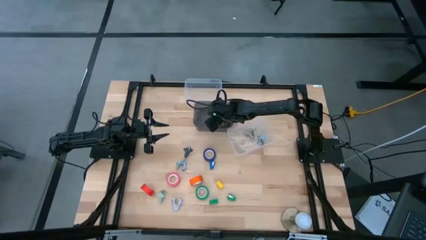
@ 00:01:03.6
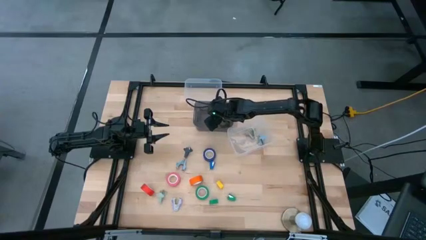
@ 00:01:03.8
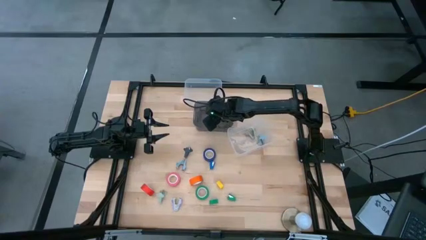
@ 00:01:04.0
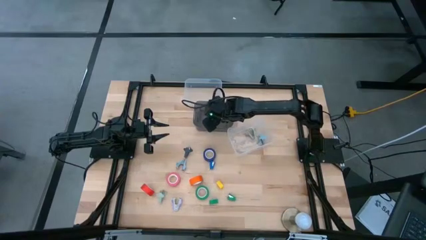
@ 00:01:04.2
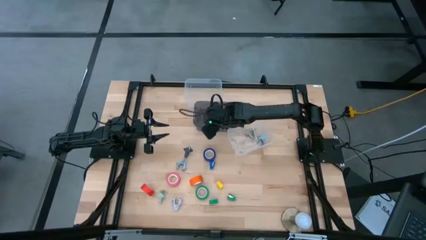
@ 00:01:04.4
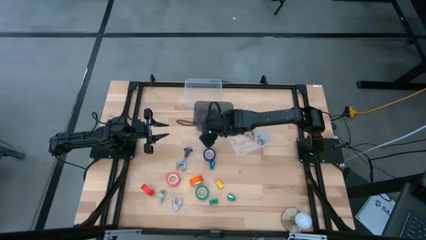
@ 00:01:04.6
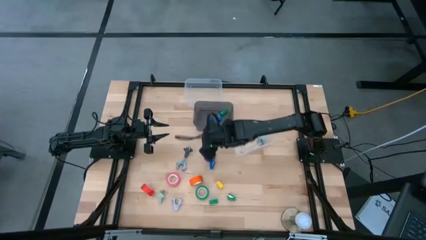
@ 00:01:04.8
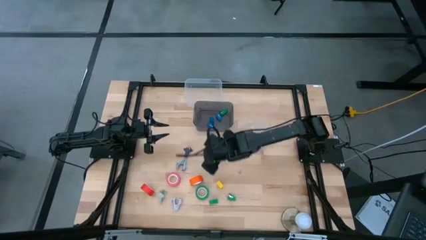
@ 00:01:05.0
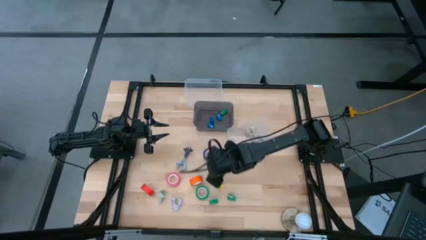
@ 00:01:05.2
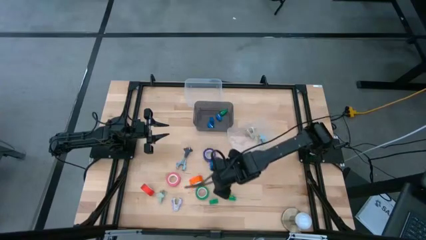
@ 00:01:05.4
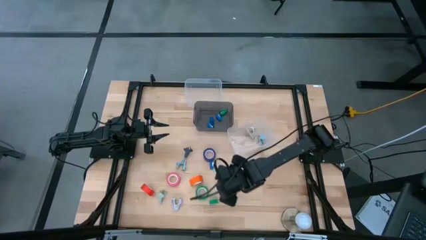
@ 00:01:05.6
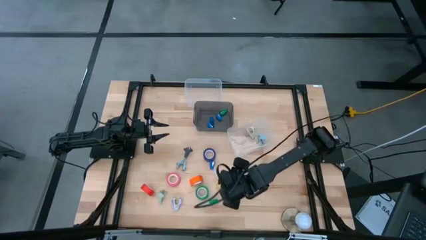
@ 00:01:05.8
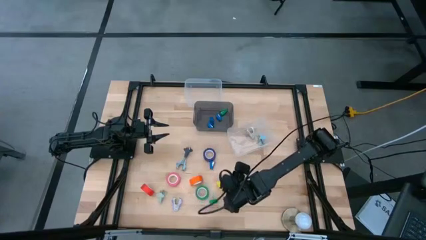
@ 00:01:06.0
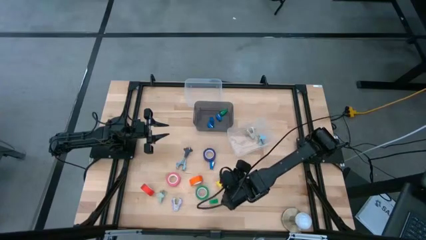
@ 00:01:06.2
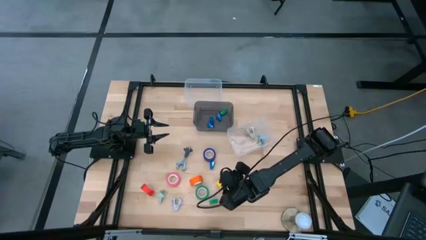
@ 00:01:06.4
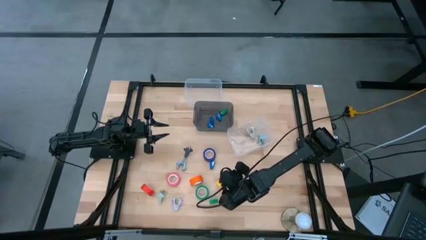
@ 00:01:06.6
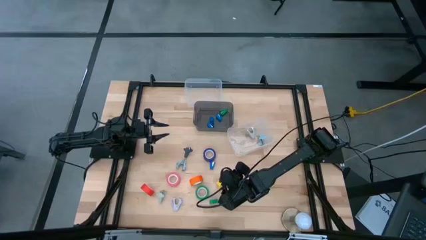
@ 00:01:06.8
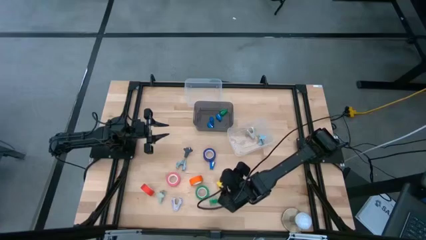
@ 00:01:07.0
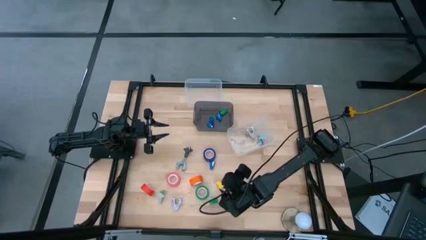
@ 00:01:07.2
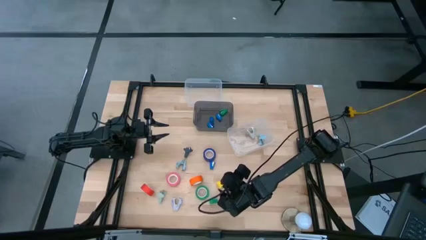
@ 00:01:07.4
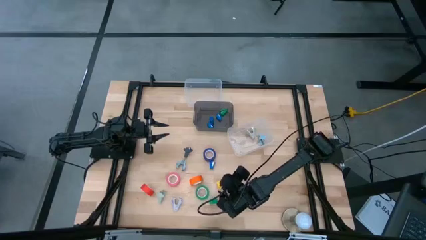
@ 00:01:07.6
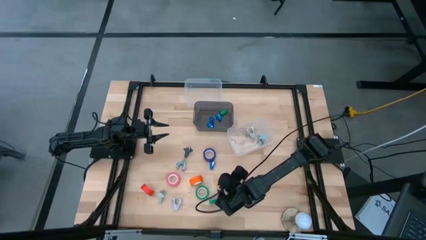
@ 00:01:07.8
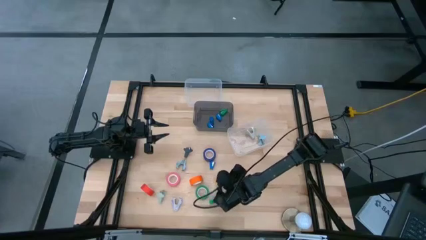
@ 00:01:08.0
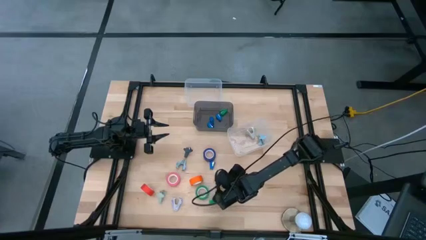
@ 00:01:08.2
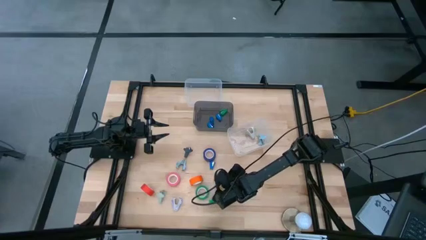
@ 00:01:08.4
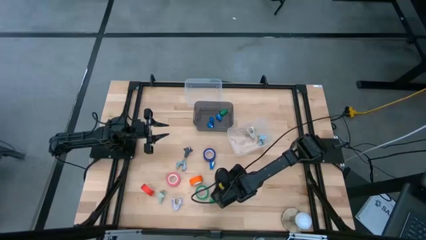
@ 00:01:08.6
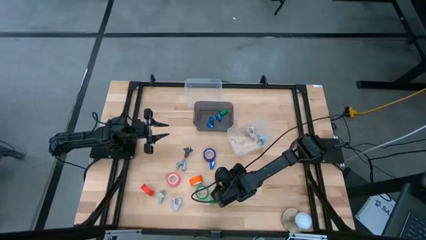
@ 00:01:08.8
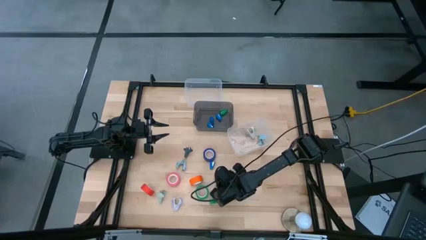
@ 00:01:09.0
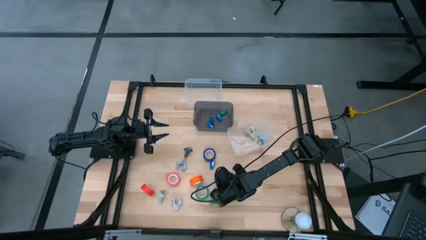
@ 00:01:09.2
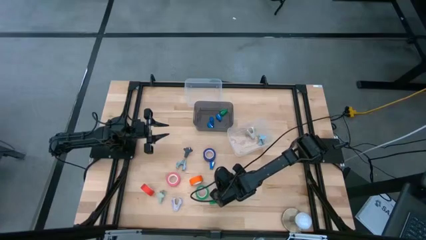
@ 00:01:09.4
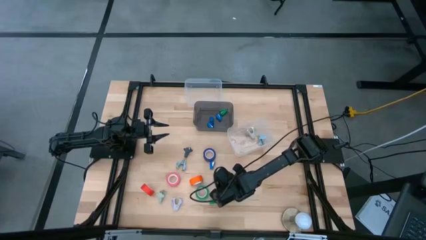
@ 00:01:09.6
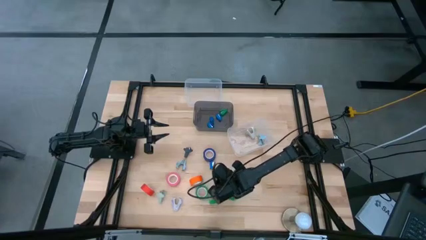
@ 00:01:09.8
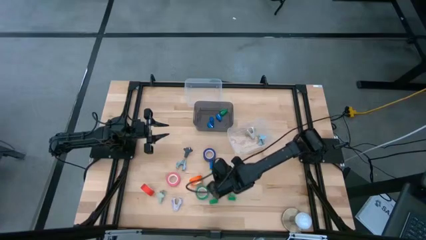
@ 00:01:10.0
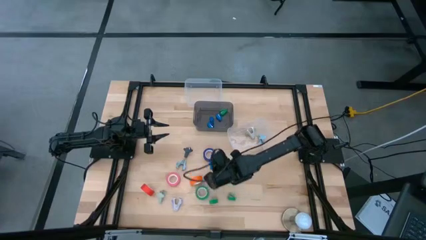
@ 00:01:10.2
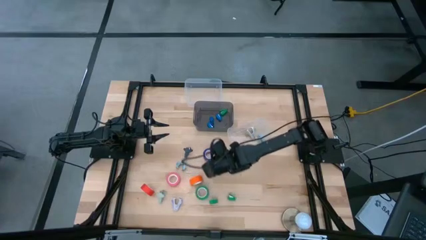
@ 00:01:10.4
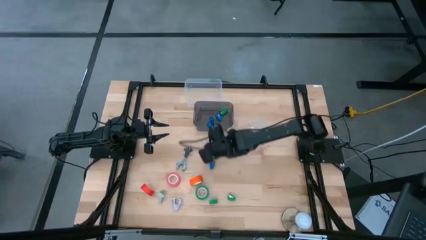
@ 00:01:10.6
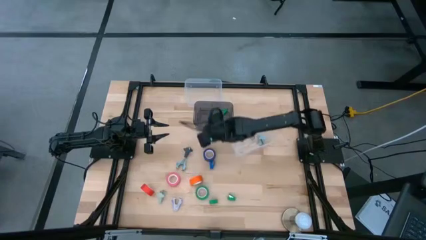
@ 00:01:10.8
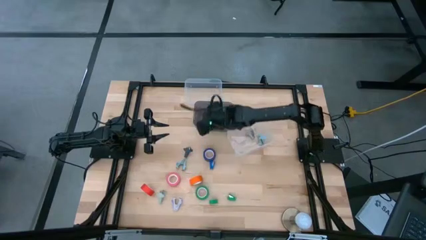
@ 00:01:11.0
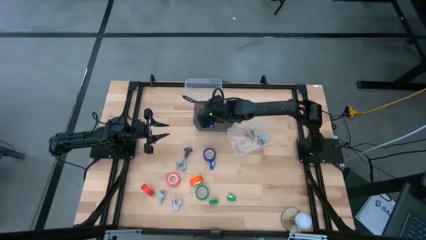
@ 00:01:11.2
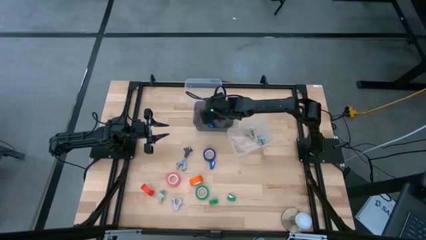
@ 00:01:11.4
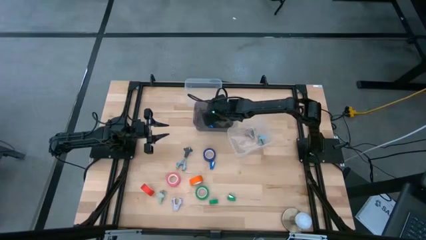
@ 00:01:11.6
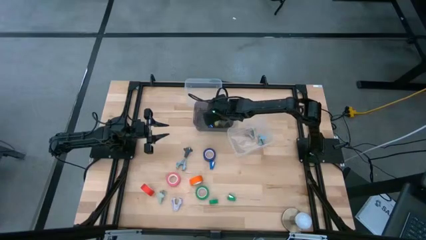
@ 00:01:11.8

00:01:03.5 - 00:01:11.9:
Task: Pick and place Stapler, Stapler remover, tape
Put the yellow stapler into the black bin

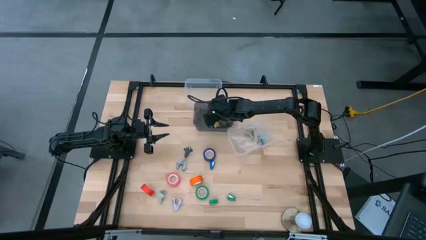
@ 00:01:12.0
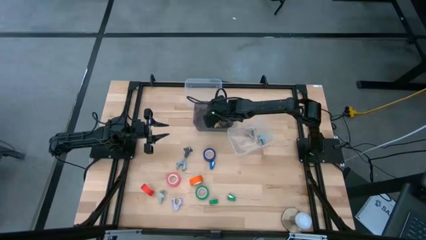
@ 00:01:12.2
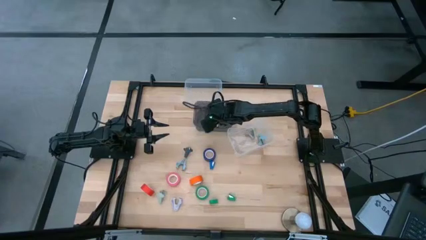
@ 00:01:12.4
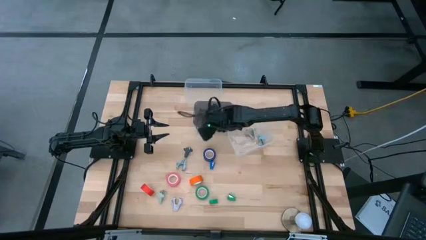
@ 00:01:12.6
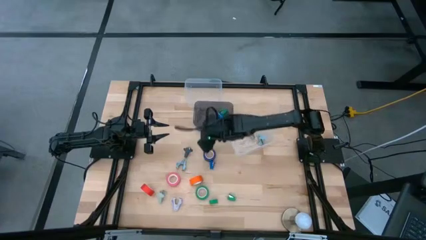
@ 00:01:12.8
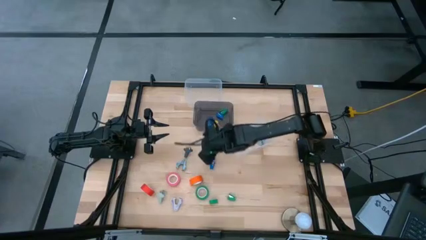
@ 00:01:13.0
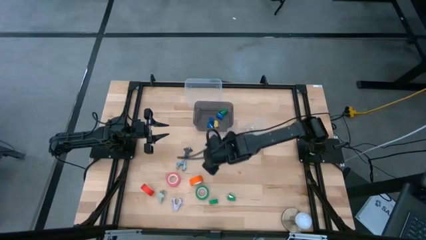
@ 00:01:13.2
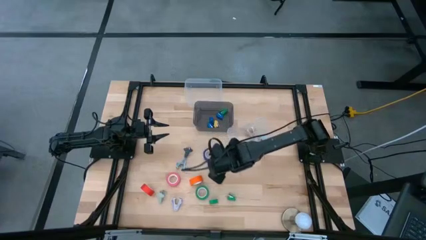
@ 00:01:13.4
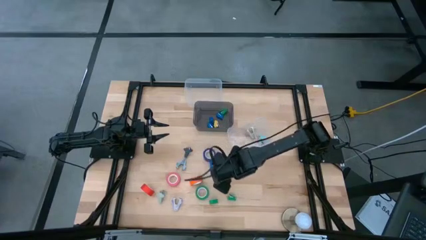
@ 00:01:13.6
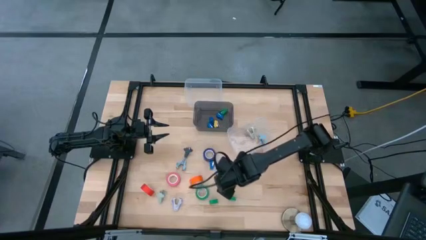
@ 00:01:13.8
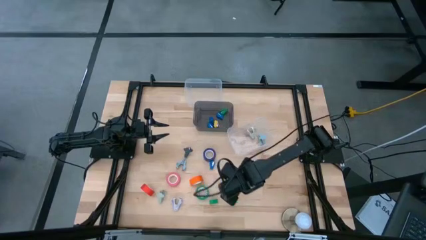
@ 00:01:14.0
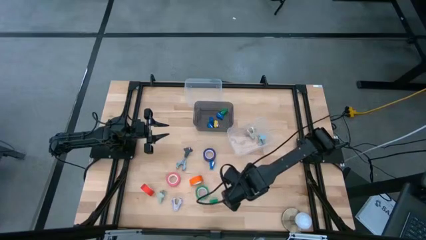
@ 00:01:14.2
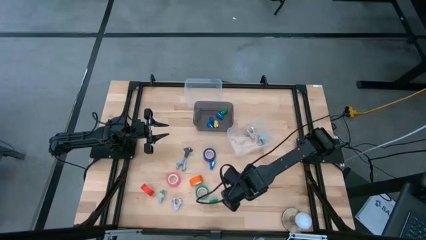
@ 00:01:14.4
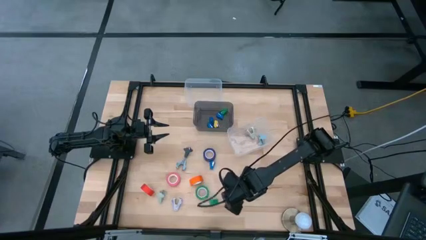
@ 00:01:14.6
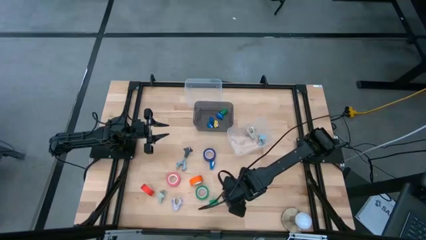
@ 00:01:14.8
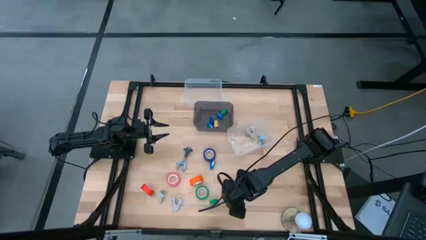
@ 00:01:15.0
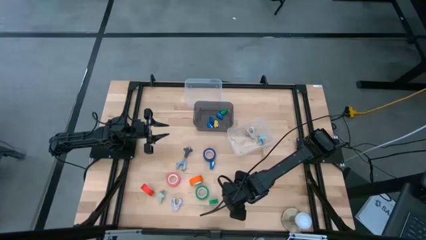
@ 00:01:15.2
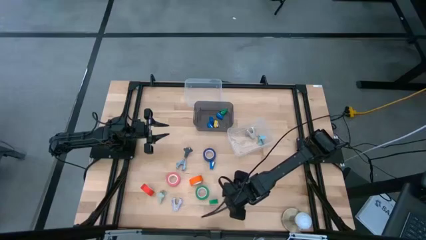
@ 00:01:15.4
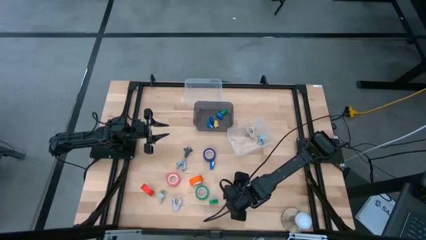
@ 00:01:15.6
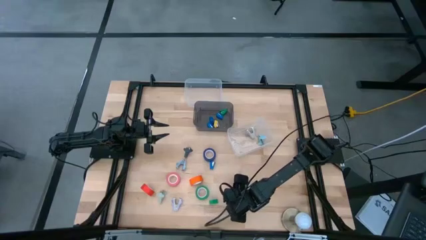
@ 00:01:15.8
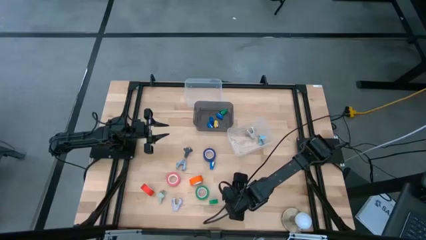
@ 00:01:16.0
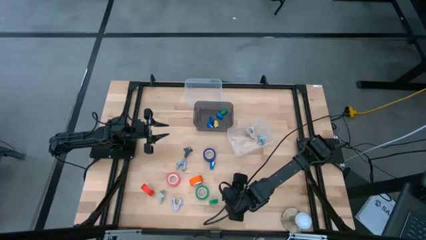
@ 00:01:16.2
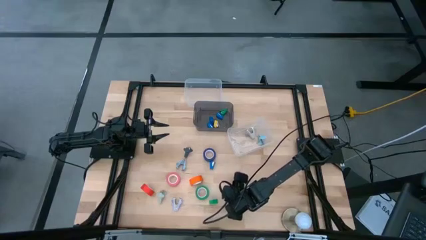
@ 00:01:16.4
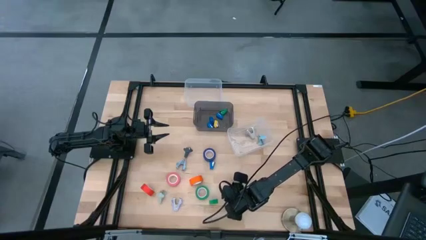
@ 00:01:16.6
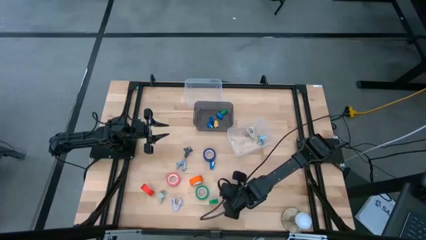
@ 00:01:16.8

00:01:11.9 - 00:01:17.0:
Put the green stapler into the black bin
